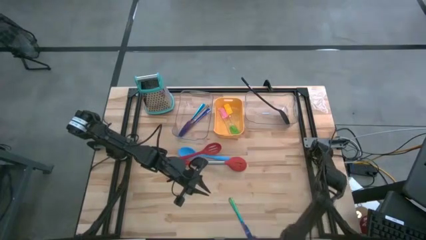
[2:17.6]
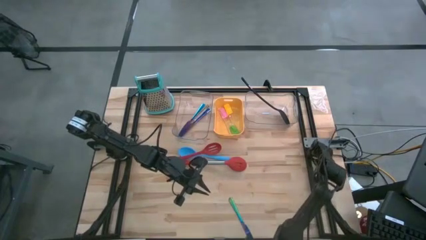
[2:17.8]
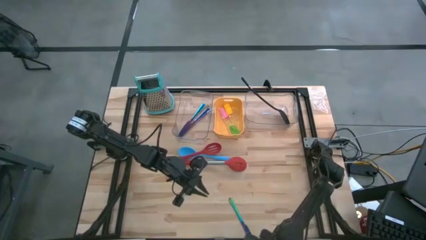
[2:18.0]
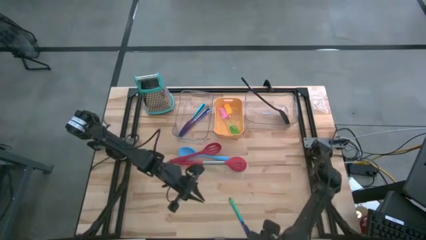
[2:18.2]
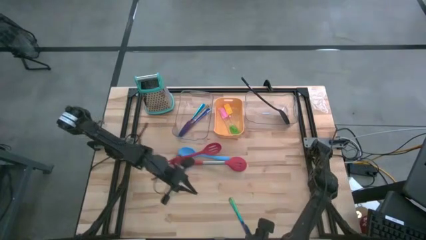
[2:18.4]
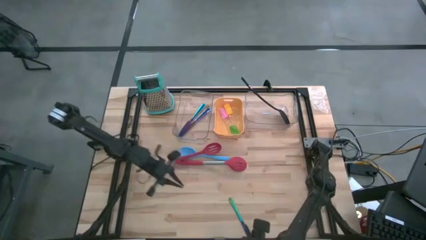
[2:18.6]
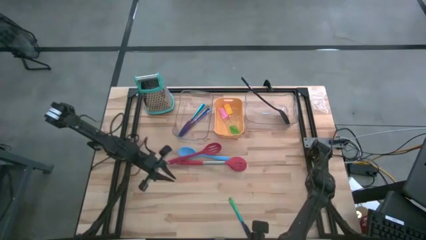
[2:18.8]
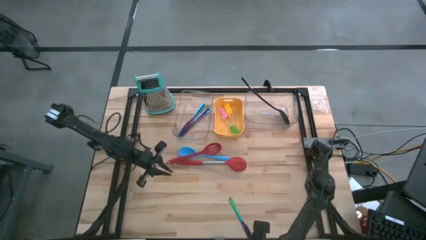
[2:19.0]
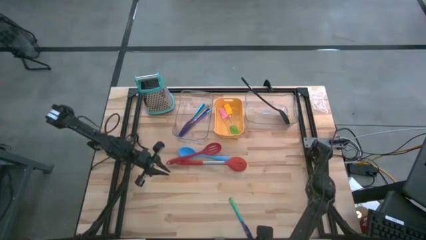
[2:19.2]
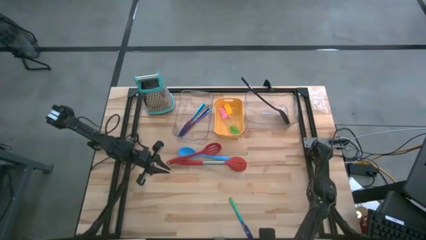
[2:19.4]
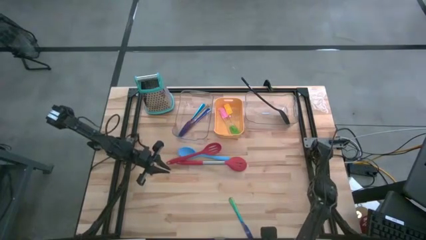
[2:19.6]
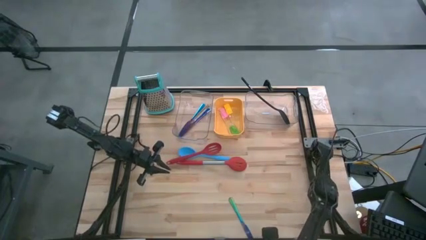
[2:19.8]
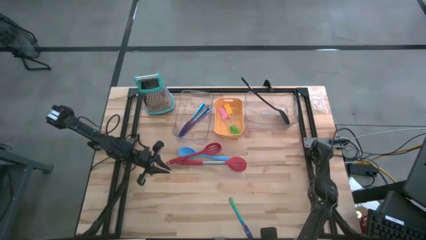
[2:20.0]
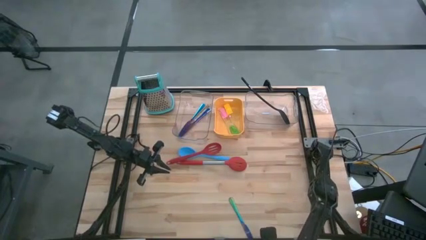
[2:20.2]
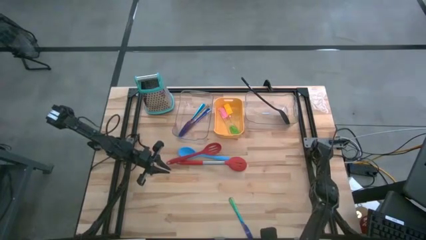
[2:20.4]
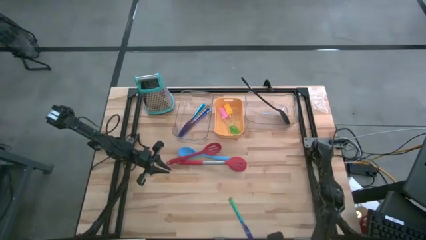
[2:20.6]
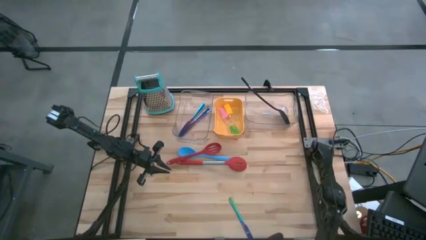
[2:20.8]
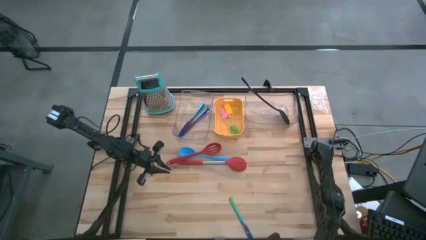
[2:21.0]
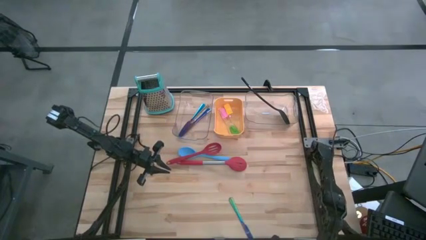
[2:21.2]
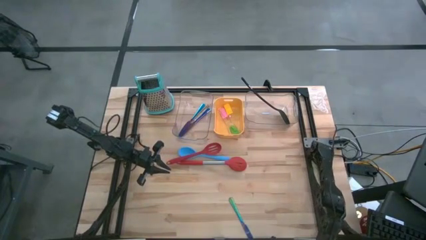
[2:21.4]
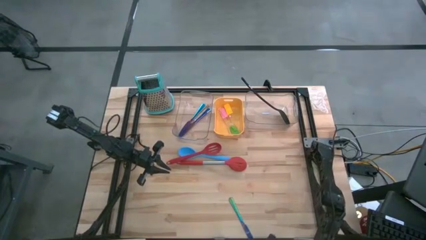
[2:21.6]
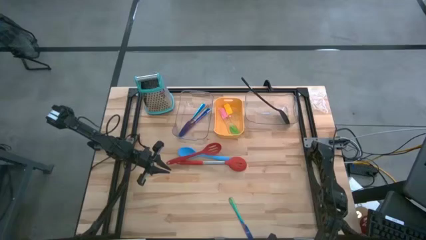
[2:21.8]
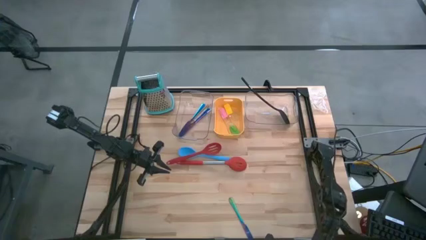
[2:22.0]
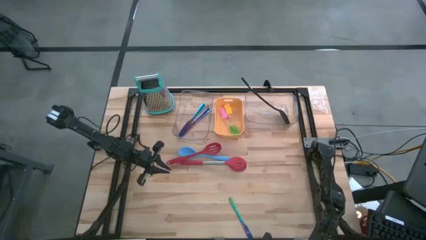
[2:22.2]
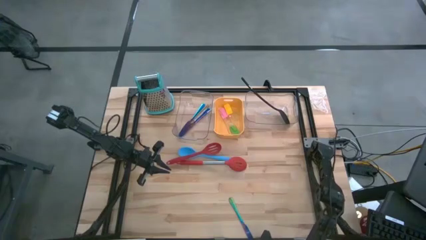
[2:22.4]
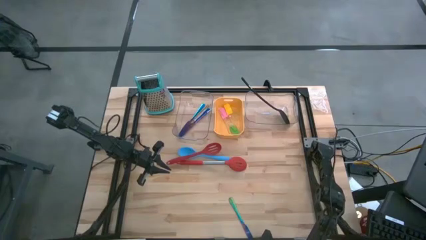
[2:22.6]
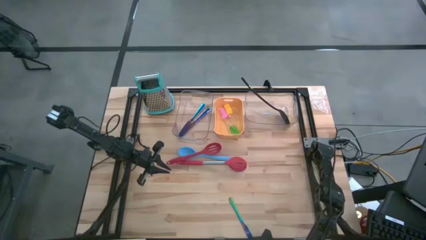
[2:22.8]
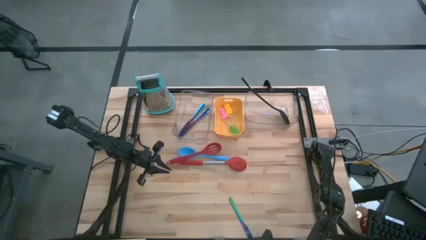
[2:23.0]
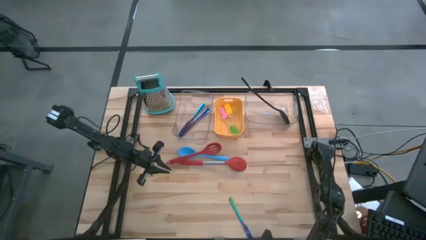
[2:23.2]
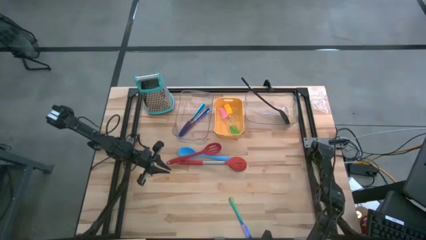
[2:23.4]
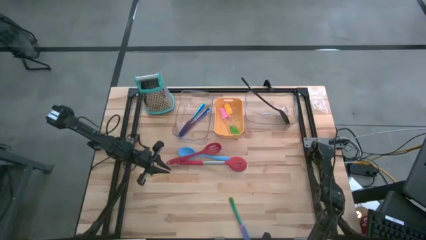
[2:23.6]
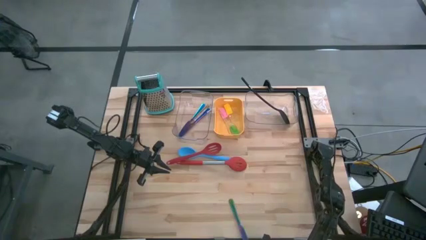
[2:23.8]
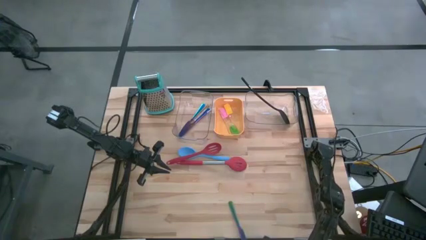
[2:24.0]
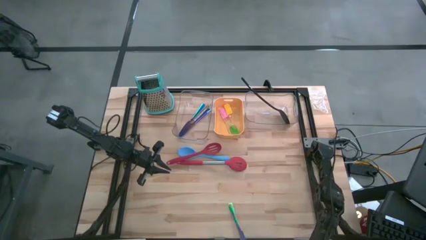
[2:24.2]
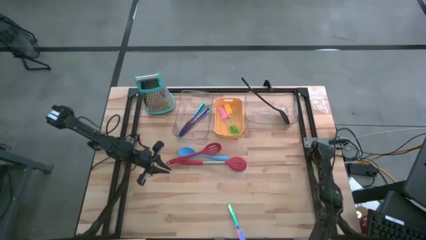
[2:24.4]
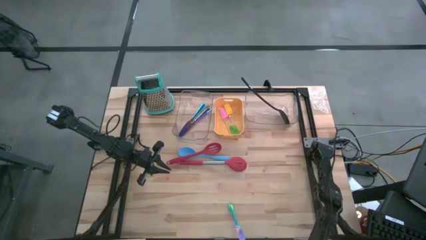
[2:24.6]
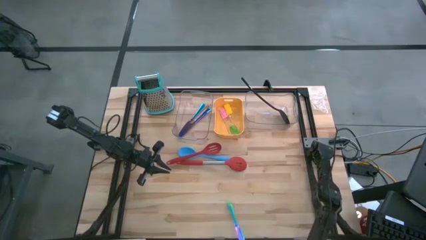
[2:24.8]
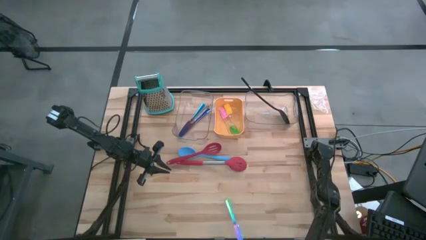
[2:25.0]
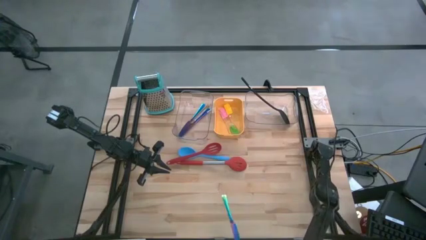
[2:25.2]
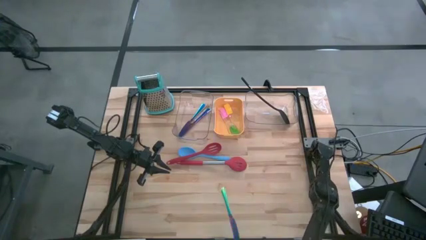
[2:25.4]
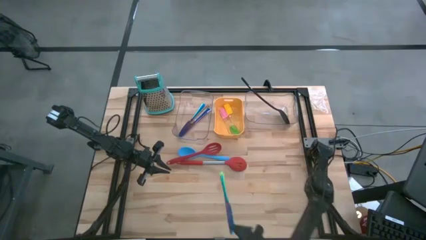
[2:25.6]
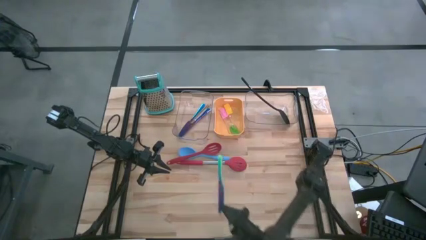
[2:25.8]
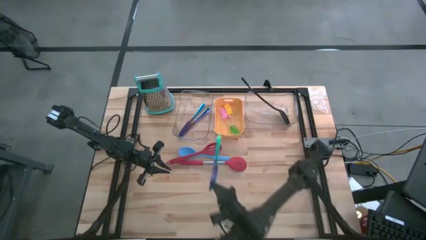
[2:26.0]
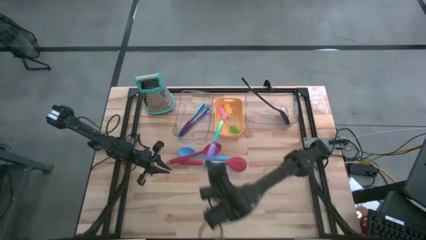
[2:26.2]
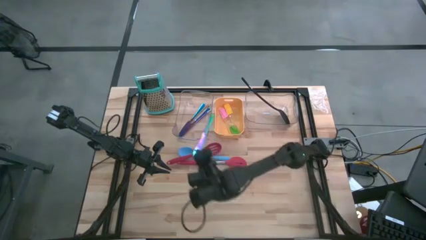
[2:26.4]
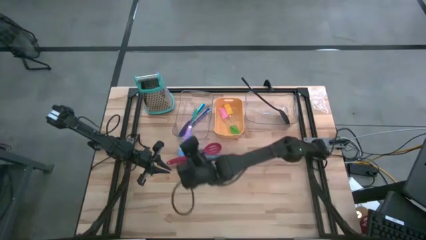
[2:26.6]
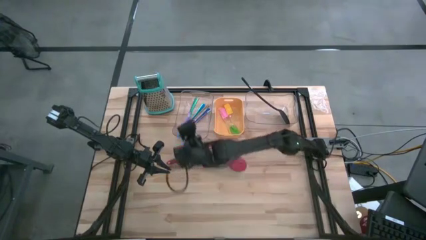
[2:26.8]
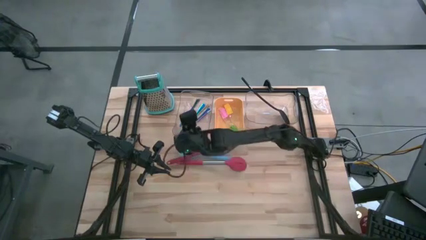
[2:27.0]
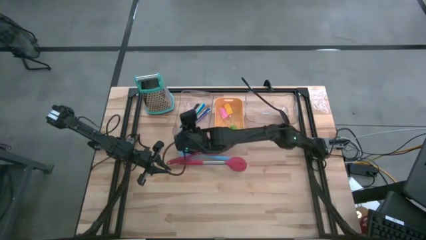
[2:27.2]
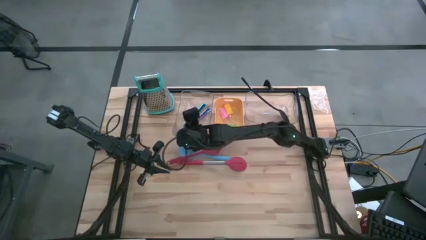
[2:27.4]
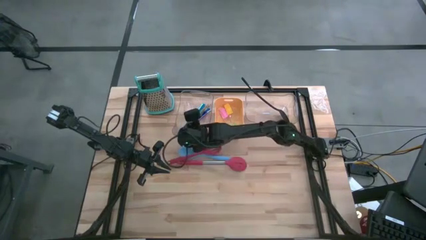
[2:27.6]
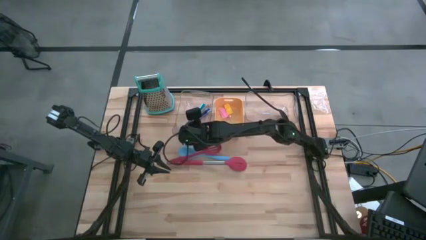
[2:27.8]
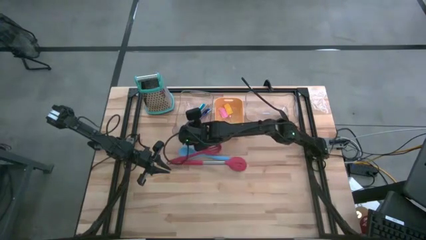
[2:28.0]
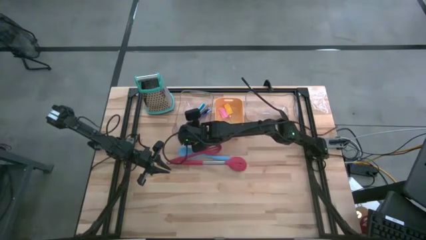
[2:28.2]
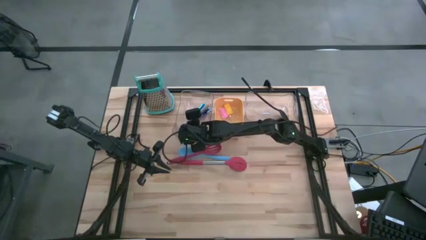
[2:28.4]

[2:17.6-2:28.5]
Task: Pick & Place Kitchen Items
Put the blue knife into the left transparent bin

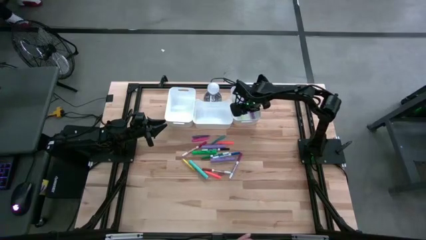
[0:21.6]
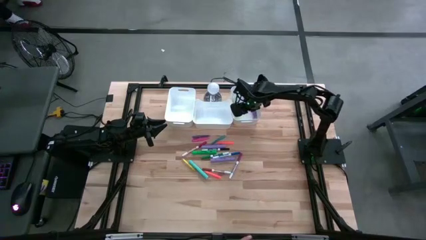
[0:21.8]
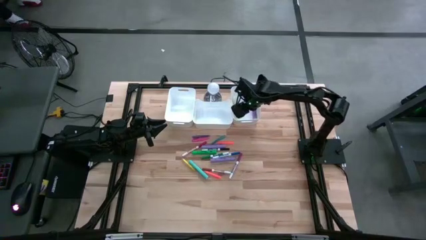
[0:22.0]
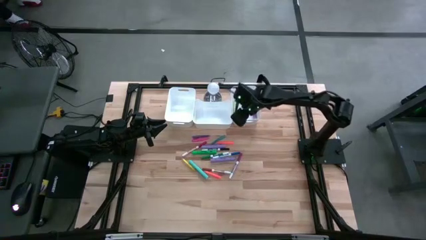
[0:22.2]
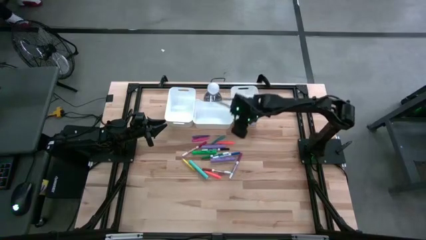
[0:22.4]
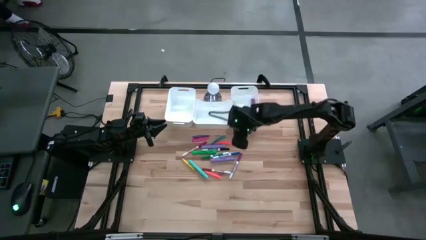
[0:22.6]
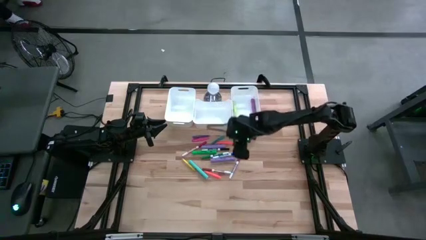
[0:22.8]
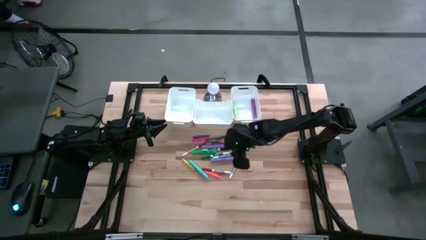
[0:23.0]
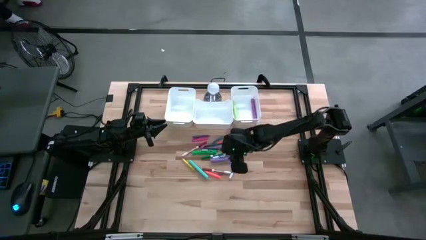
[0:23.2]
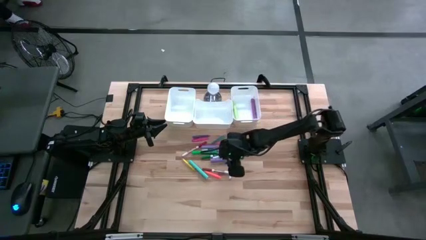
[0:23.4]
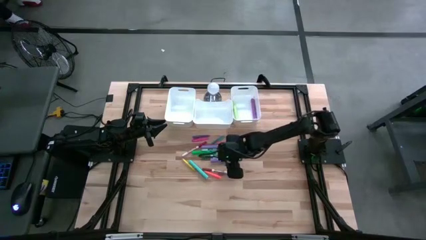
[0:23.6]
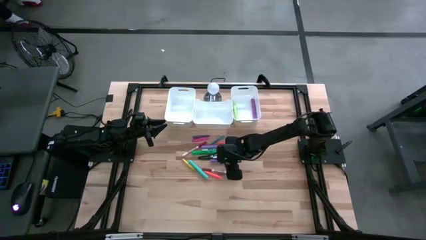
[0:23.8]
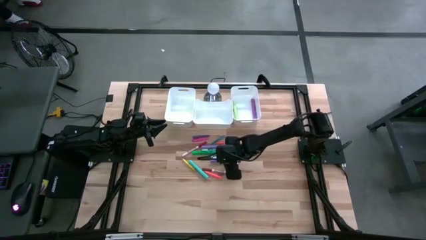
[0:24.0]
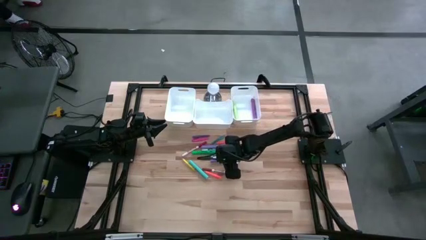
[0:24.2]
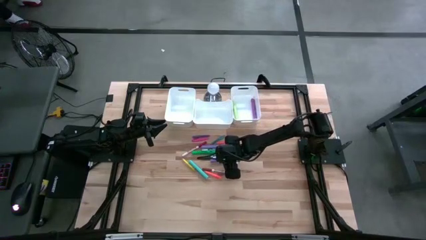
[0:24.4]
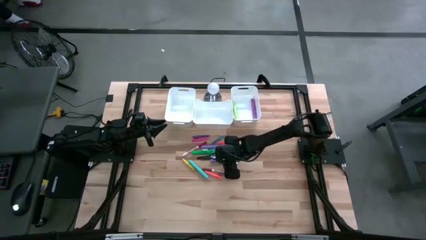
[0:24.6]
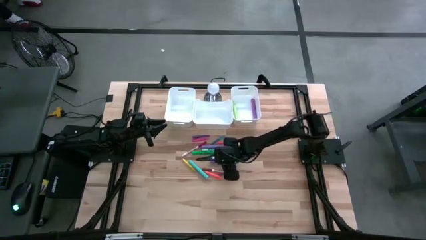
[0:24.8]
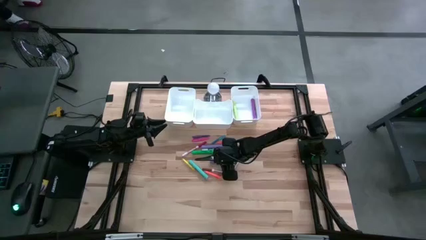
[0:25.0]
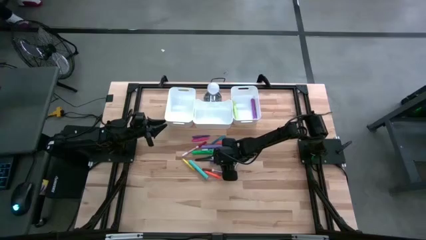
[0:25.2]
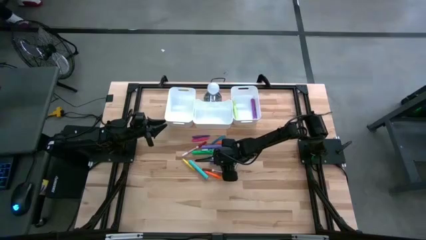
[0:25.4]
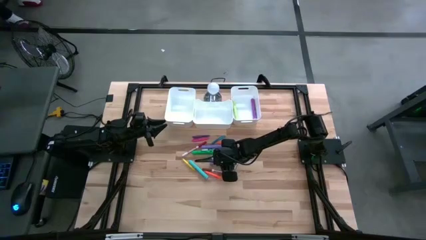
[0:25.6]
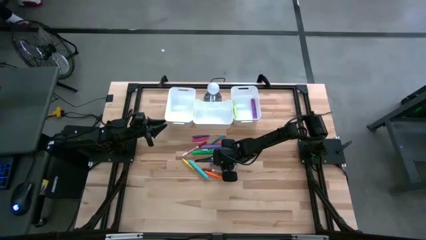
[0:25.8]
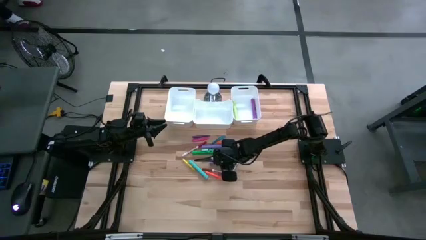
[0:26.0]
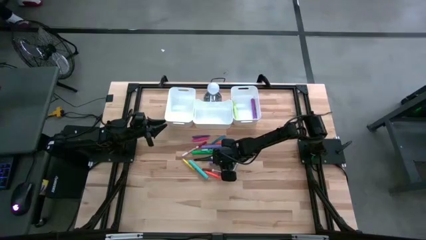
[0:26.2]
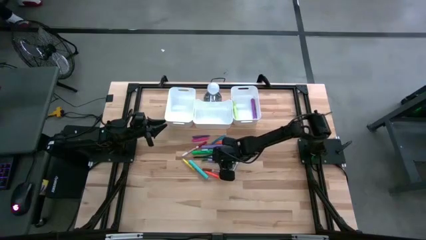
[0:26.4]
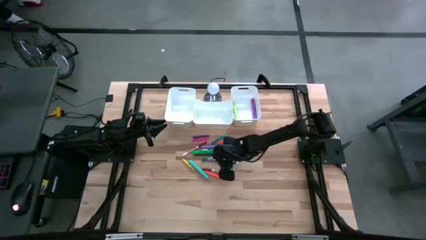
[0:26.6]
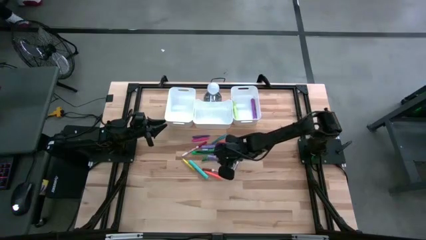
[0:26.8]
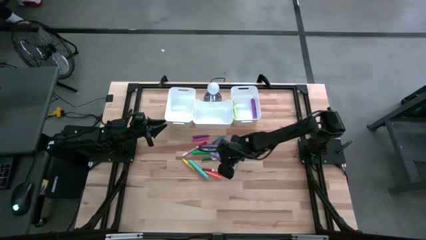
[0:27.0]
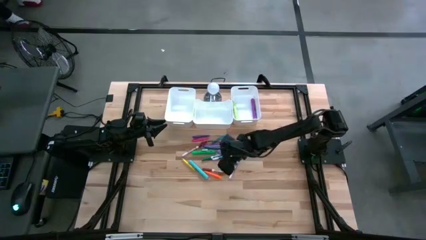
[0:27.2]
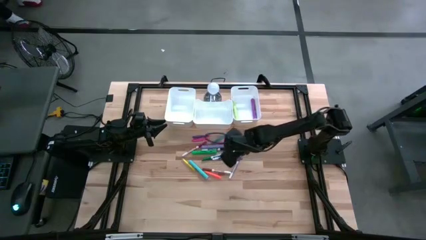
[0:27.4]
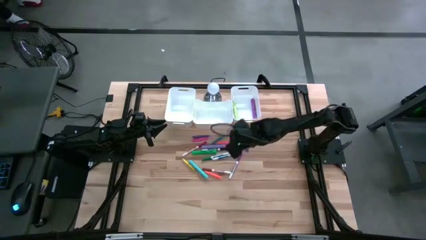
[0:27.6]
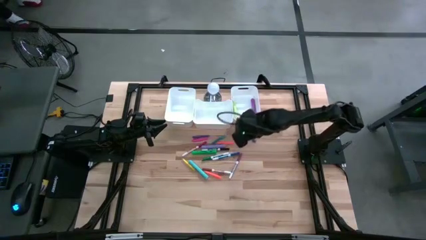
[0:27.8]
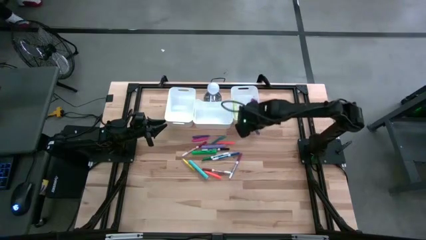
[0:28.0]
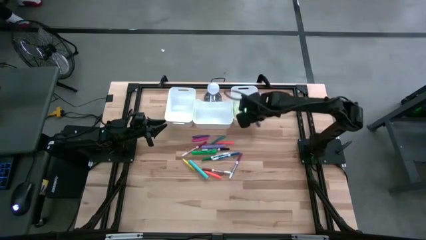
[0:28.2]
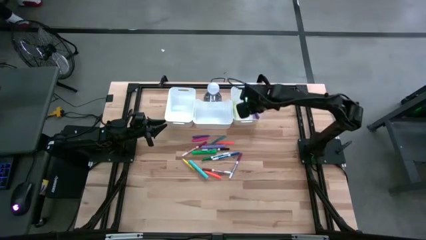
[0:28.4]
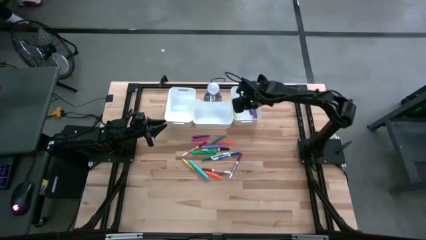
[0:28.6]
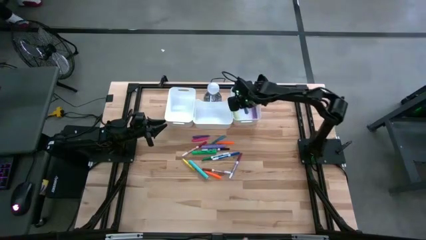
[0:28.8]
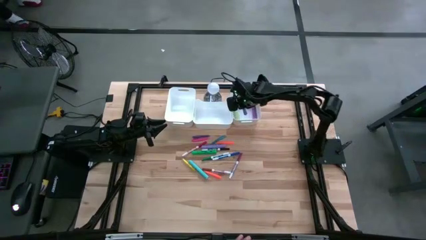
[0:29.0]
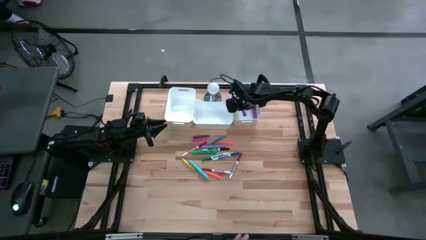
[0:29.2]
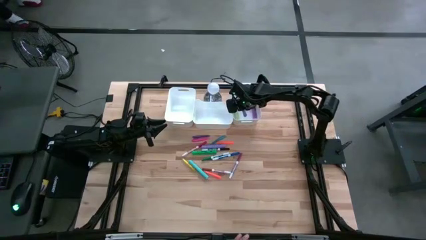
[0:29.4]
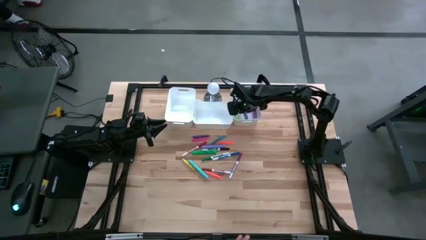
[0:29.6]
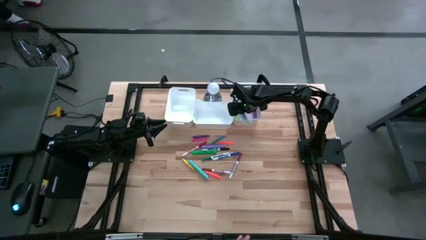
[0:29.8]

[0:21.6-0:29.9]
Task: Pick & Place Markers
Put the bottom purple highlighter pen into the right white bin
